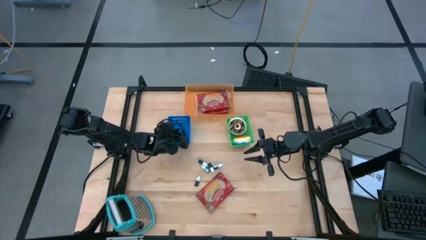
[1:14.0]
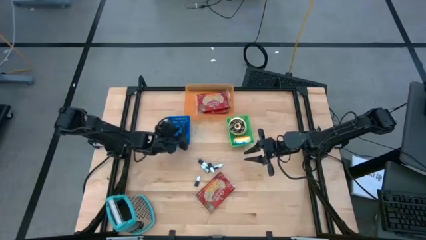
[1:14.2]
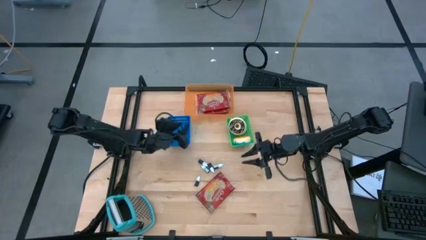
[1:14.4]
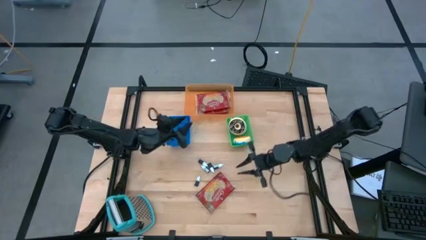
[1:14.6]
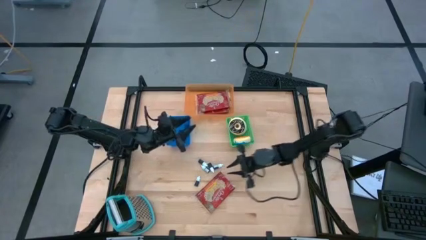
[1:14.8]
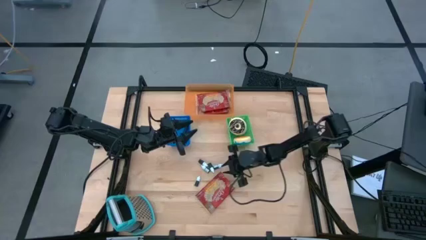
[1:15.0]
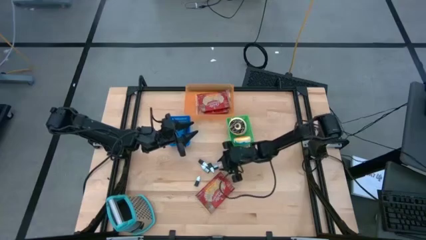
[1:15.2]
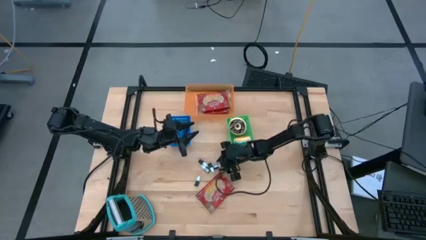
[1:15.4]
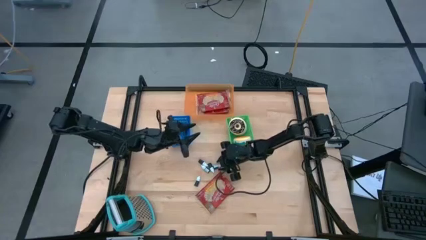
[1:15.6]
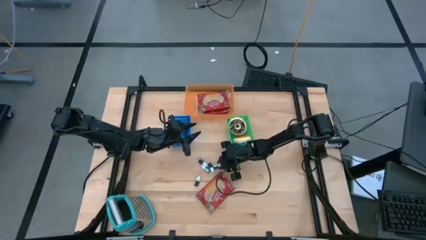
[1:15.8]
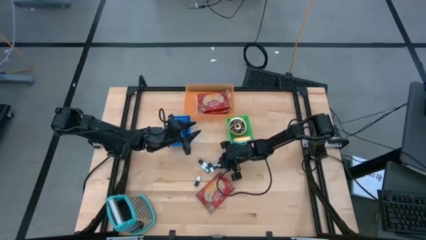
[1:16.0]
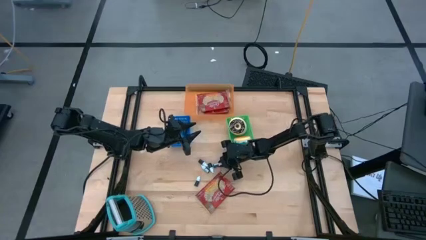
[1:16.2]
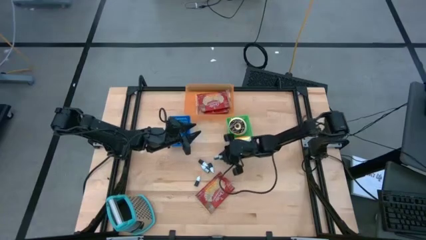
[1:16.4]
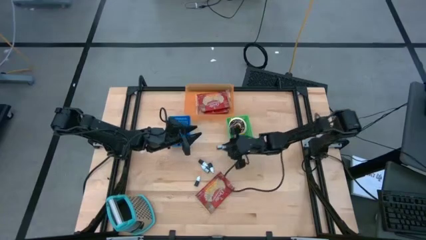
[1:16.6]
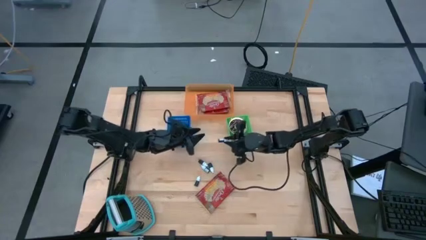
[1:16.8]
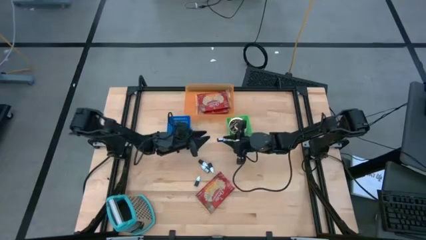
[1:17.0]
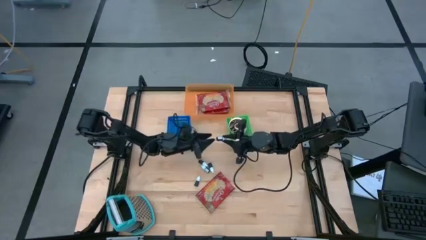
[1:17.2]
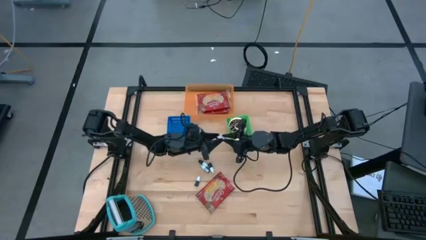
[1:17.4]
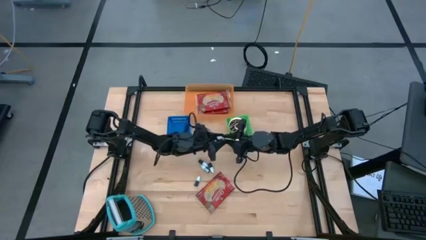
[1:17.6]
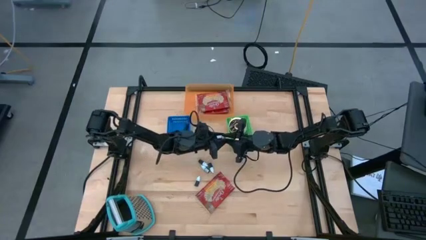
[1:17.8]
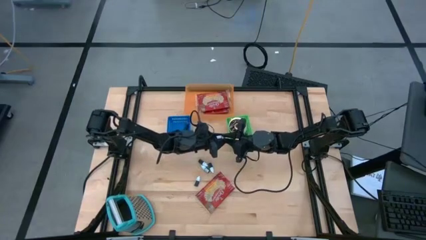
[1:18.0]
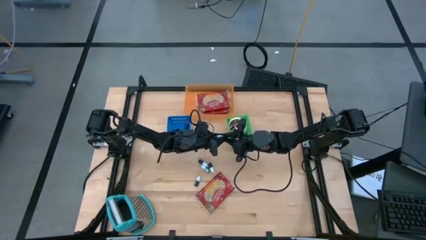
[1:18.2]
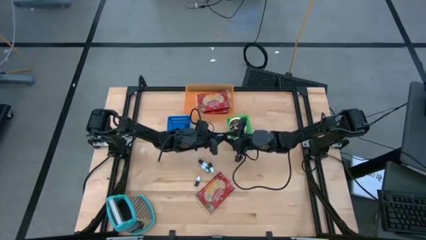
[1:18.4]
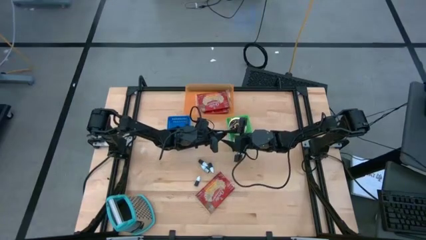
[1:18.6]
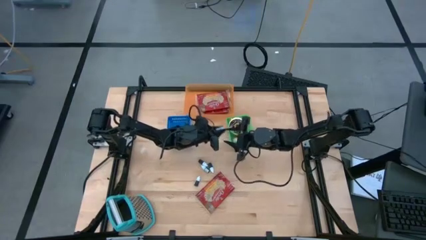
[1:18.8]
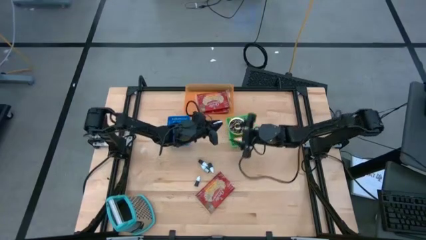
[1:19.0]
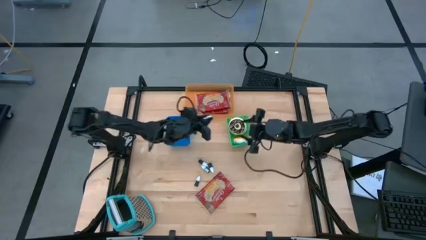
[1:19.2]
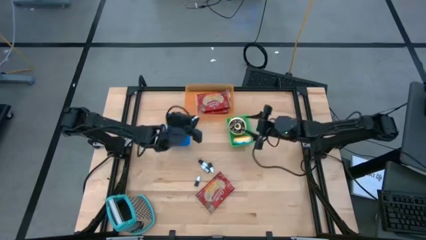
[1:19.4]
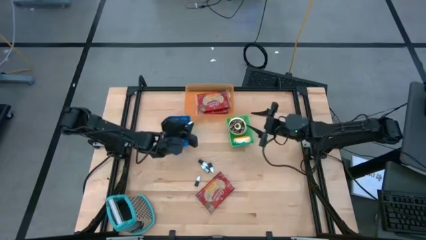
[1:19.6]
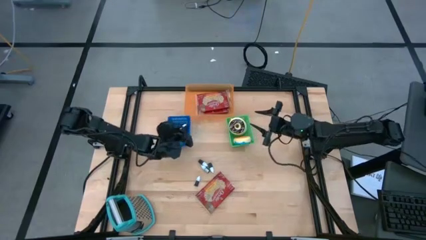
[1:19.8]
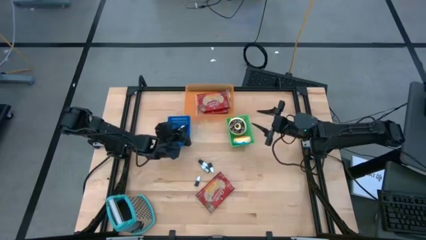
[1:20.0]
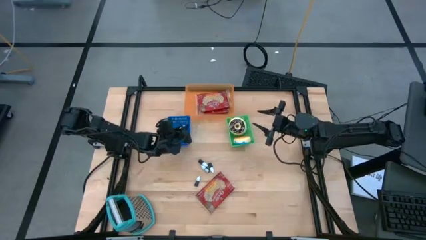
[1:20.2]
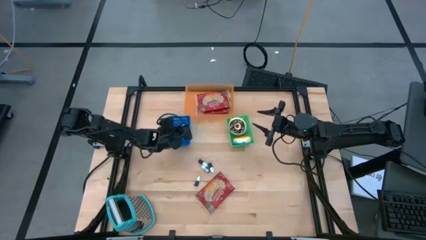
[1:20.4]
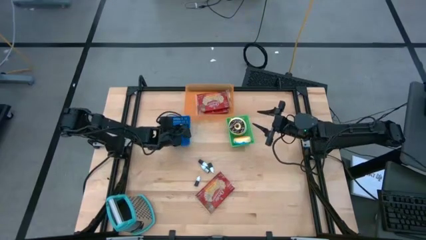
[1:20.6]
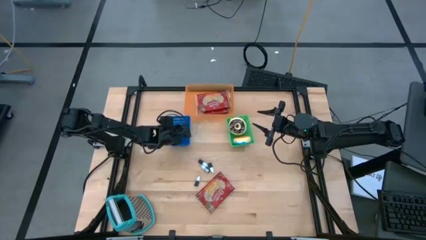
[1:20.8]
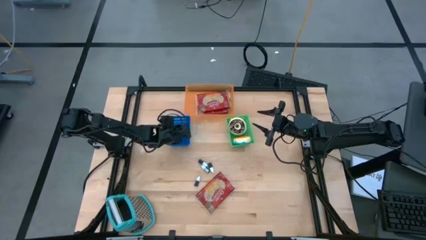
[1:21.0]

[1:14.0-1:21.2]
Put the purple food coloring bottle into the blue bin

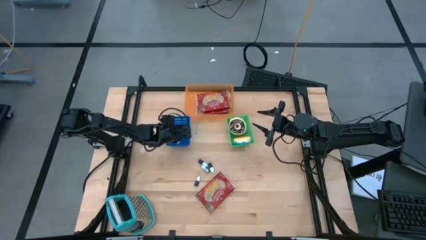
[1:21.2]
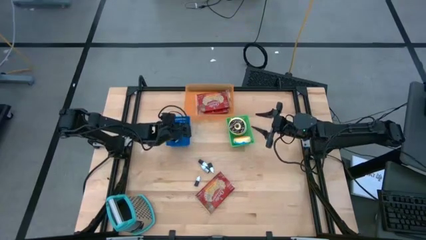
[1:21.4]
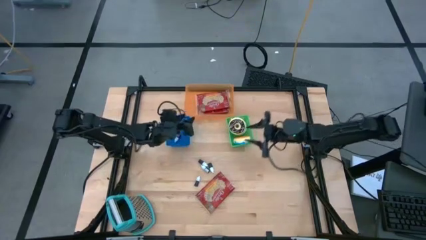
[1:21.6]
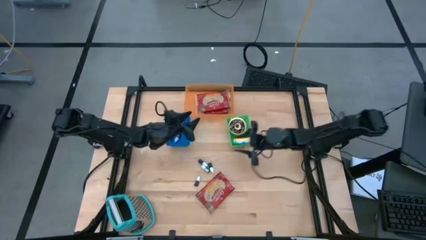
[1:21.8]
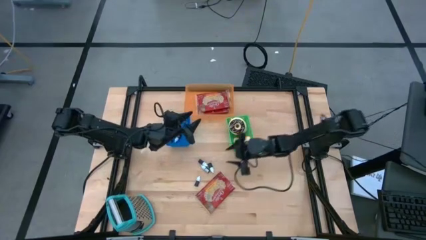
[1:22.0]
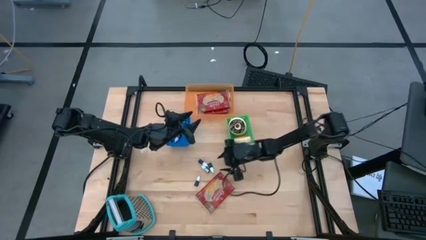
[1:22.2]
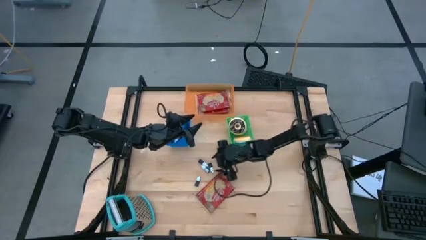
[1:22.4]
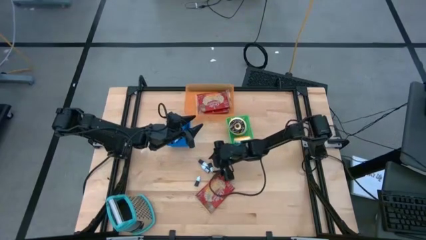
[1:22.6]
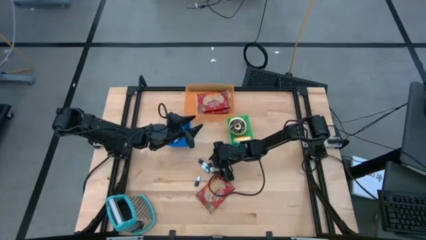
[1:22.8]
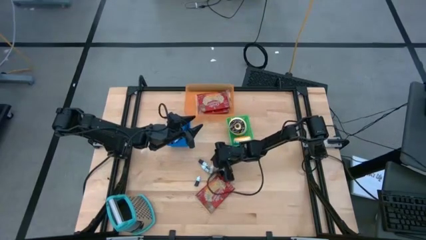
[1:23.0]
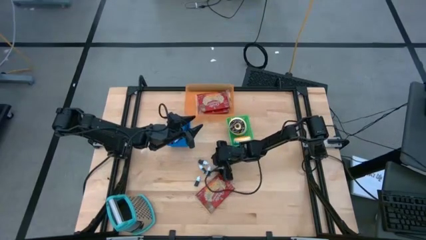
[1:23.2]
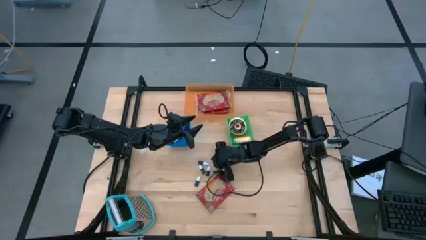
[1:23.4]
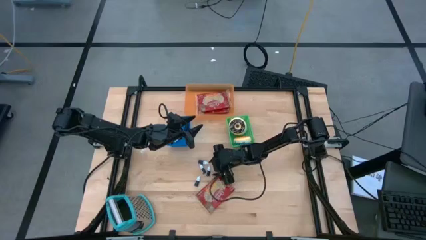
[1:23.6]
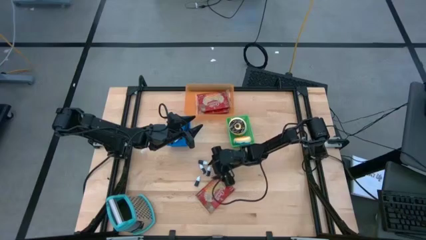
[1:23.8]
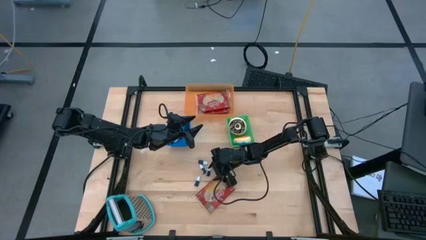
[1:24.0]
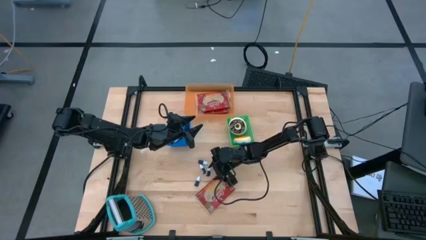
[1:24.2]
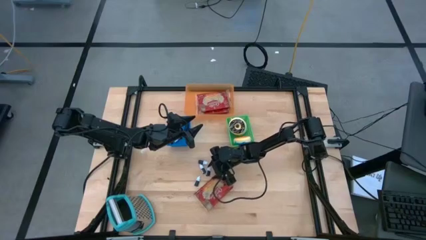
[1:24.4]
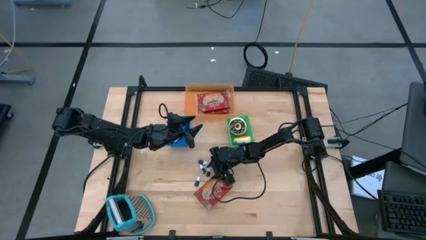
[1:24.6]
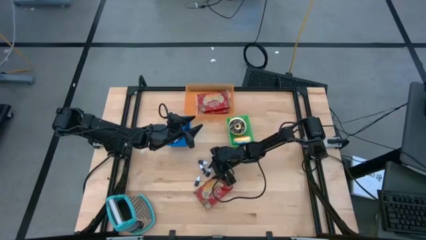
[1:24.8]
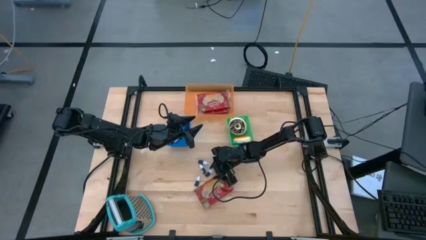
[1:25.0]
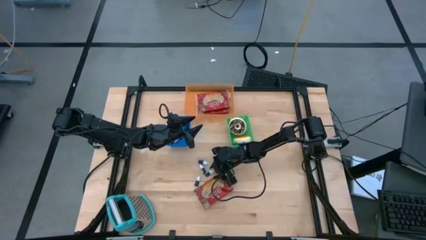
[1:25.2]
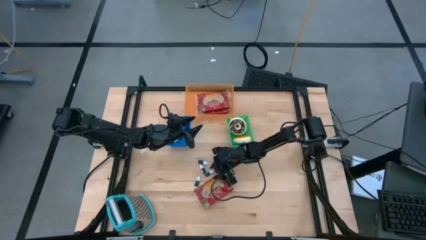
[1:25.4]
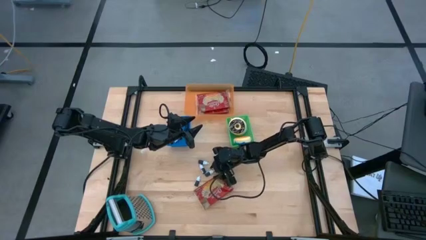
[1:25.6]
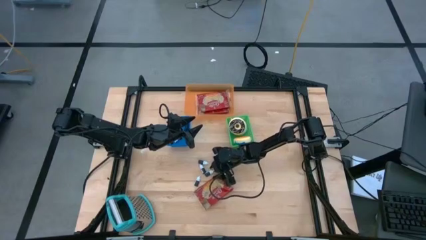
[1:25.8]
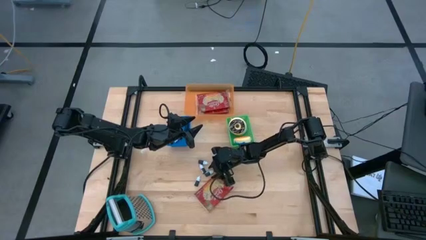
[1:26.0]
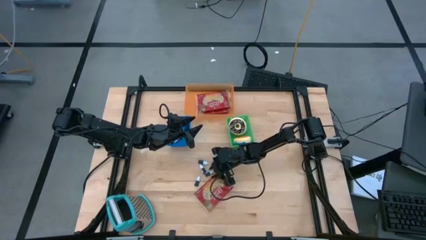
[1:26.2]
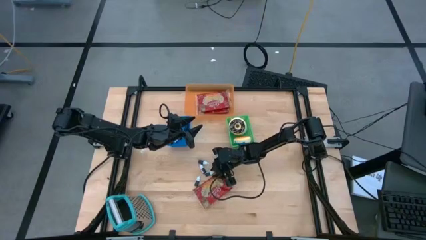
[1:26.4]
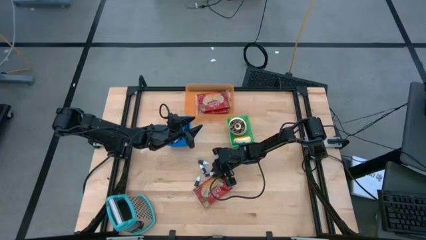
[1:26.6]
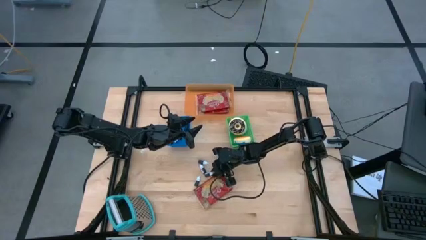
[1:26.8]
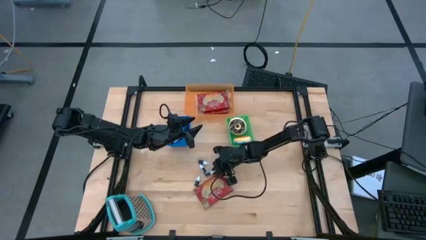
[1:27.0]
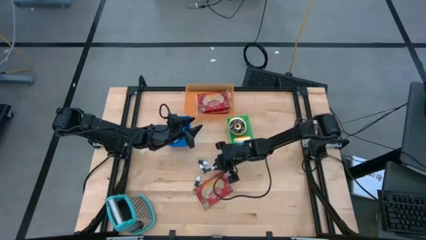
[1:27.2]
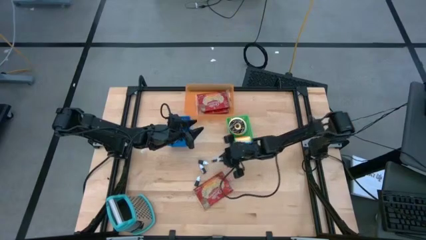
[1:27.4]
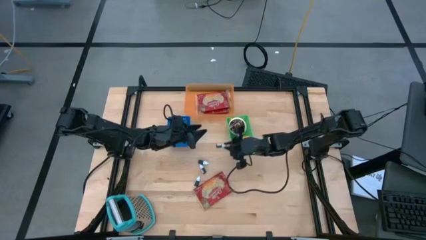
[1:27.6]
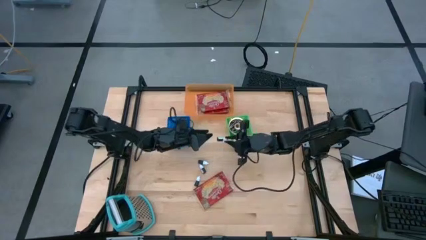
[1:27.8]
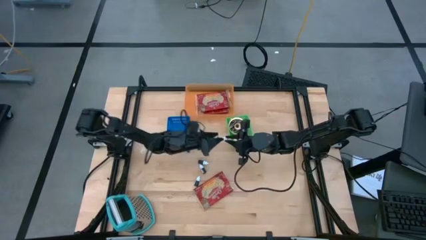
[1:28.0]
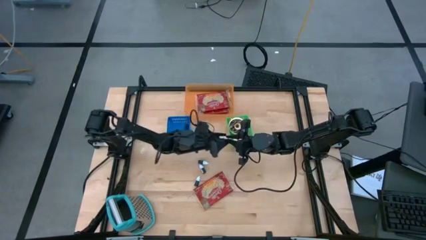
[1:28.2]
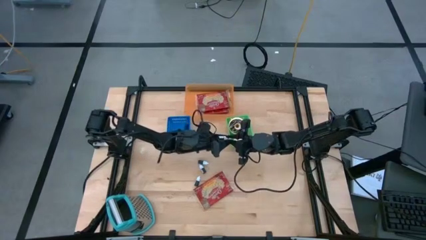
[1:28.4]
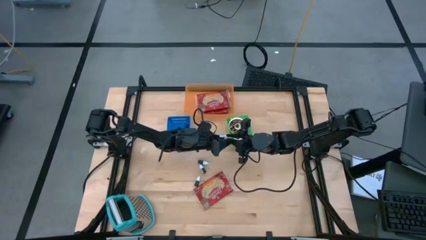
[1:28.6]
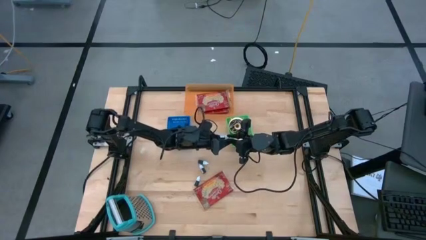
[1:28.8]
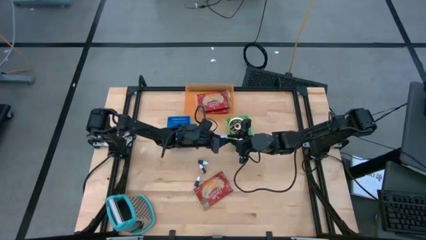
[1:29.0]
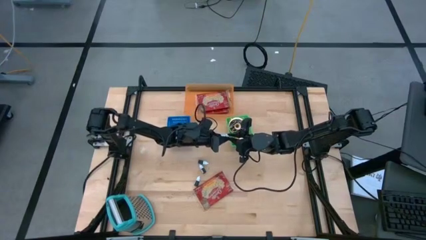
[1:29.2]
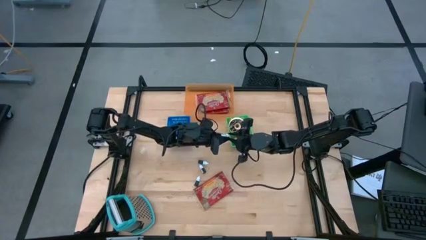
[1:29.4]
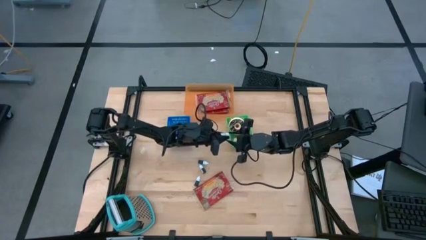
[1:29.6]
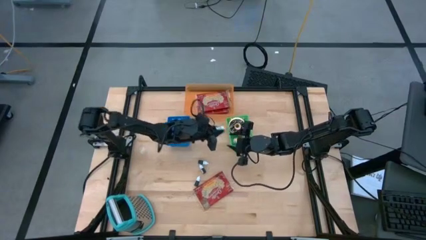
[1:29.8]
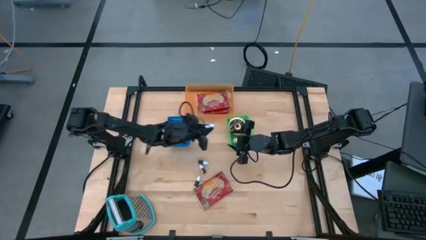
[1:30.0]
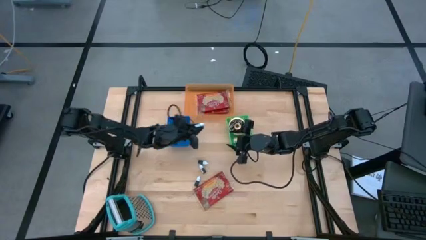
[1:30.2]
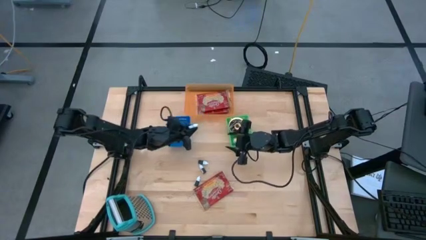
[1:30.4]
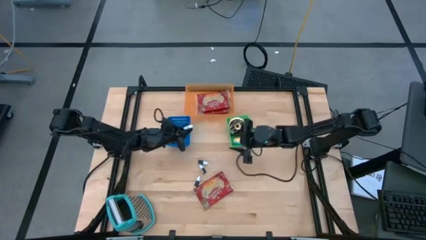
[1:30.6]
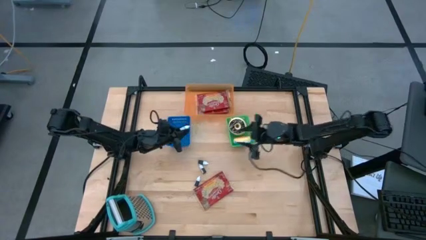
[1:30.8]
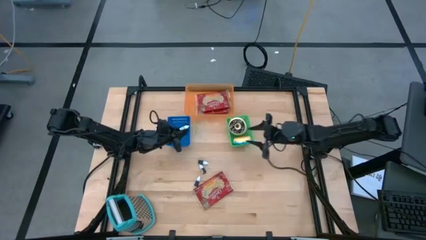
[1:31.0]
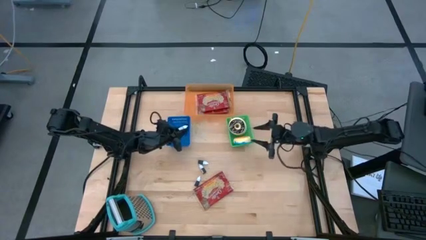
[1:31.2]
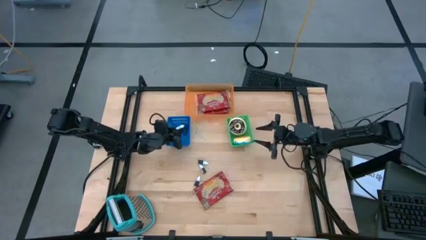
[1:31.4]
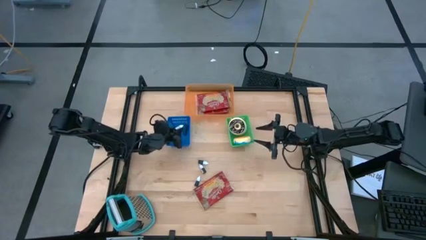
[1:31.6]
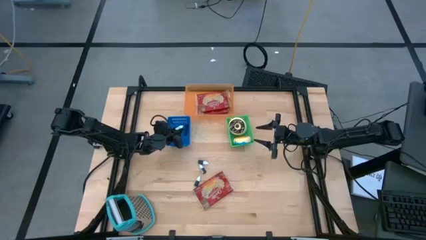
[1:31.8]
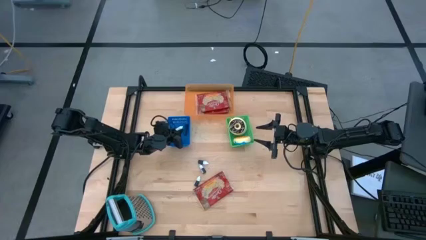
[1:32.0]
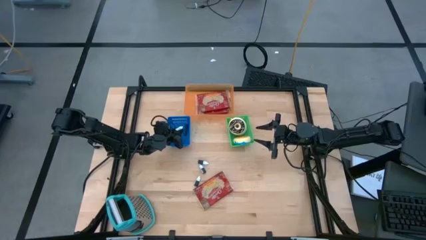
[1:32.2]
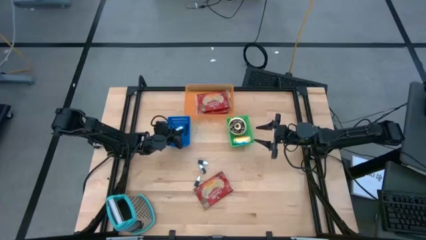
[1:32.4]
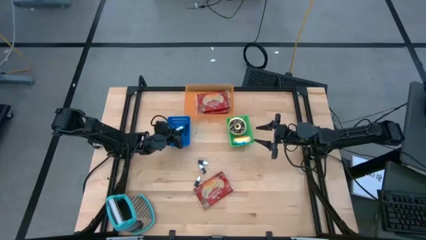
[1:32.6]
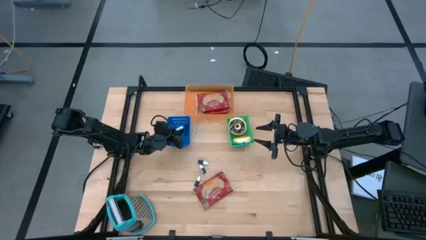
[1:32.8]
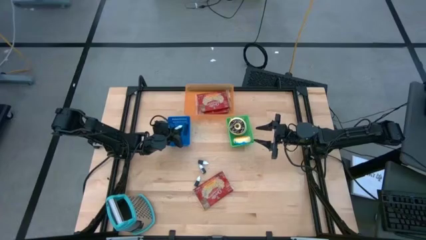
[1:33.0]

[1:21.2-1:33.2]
Put the green food coloring bottle into the blue bin
